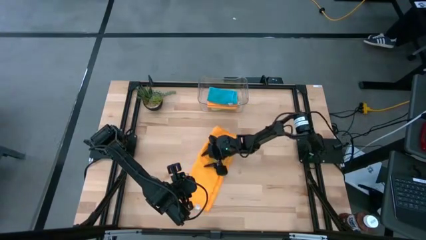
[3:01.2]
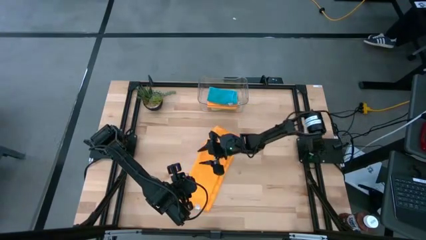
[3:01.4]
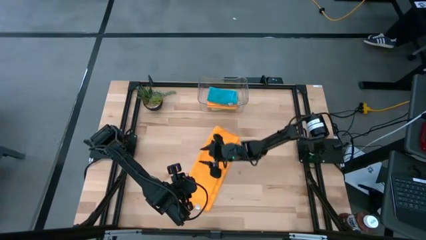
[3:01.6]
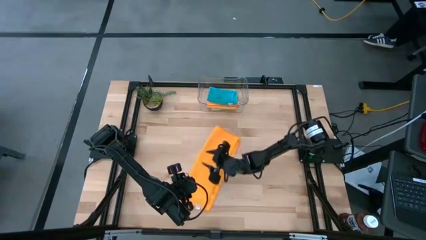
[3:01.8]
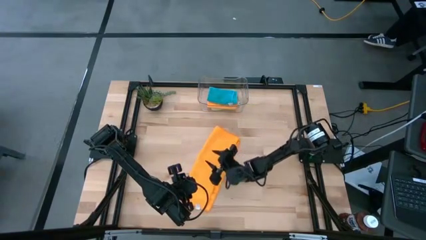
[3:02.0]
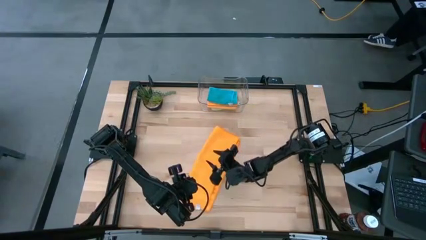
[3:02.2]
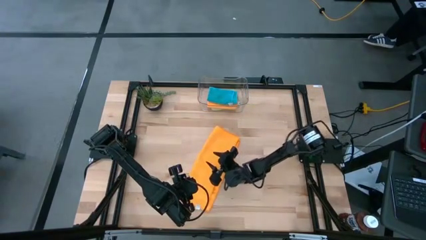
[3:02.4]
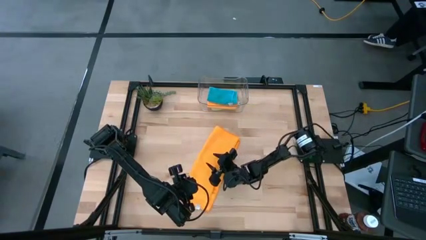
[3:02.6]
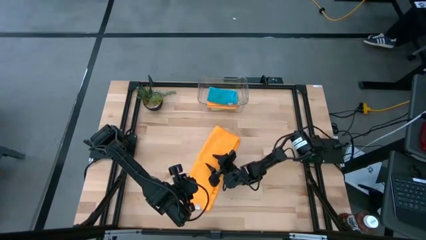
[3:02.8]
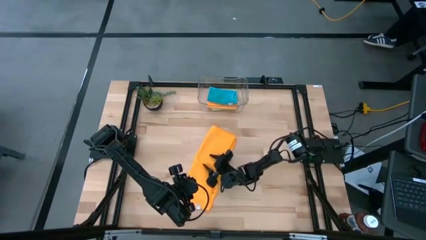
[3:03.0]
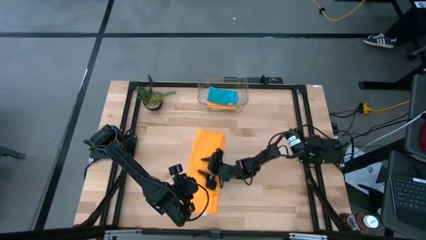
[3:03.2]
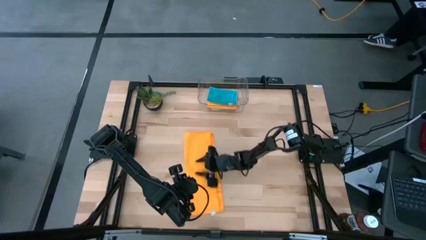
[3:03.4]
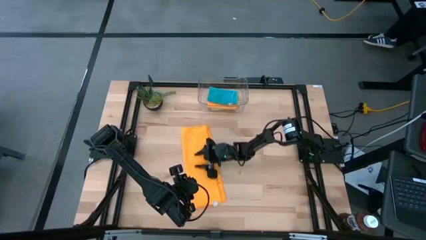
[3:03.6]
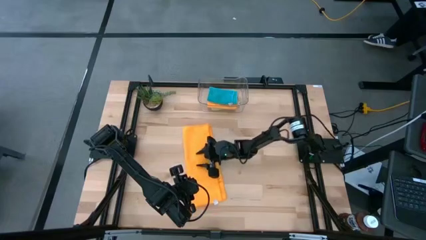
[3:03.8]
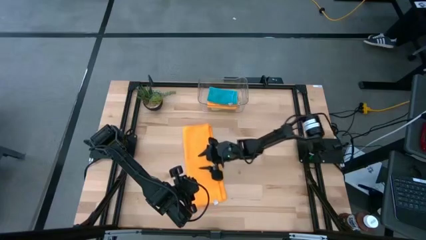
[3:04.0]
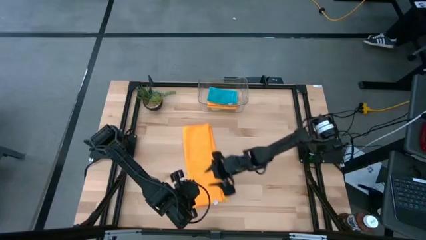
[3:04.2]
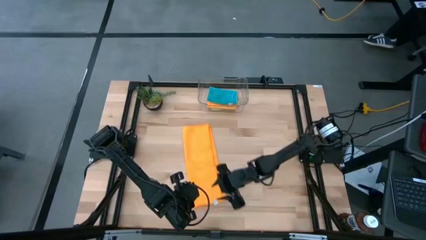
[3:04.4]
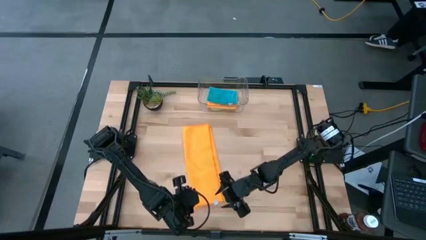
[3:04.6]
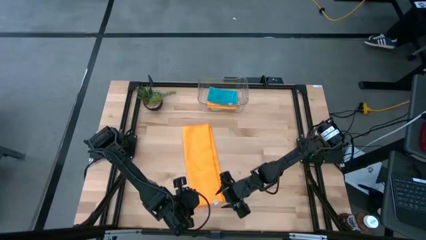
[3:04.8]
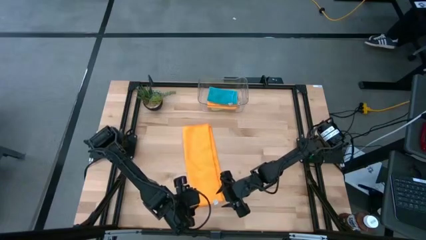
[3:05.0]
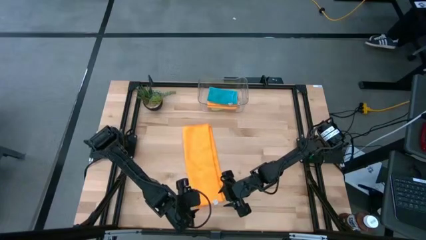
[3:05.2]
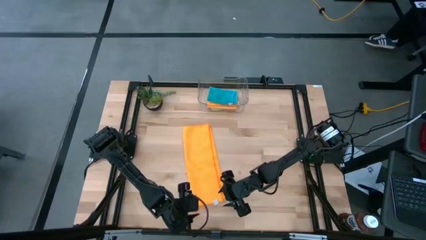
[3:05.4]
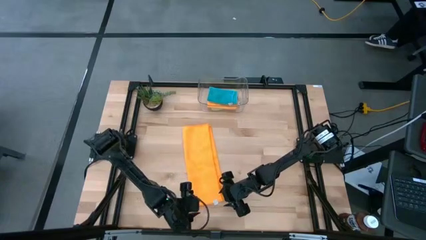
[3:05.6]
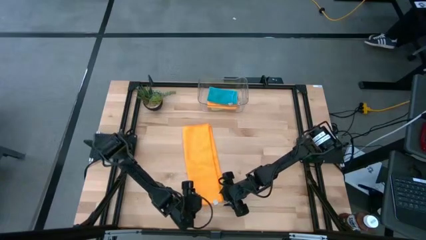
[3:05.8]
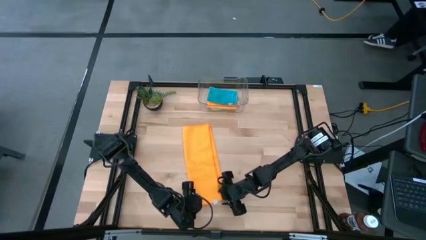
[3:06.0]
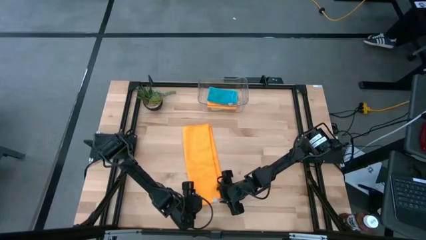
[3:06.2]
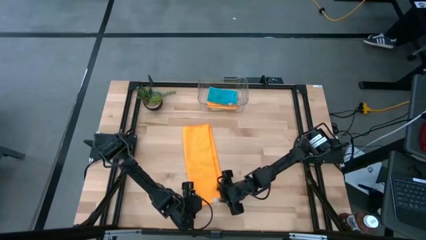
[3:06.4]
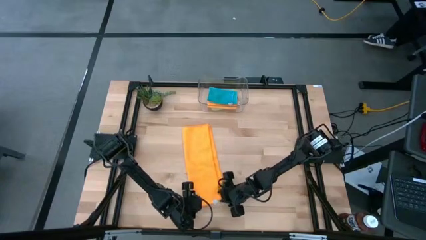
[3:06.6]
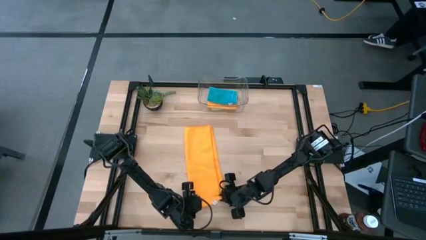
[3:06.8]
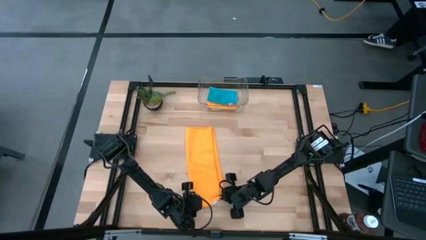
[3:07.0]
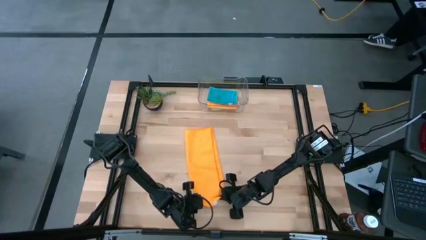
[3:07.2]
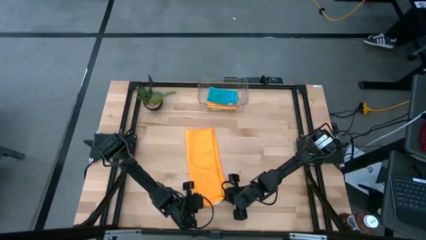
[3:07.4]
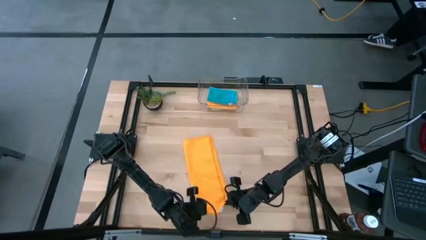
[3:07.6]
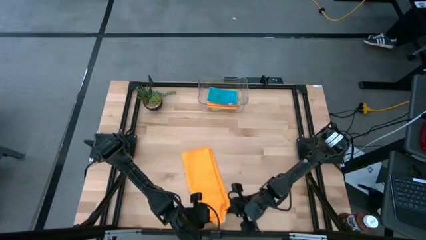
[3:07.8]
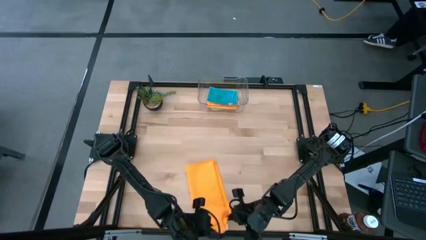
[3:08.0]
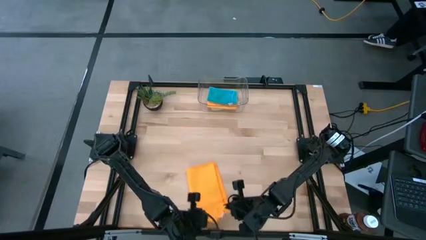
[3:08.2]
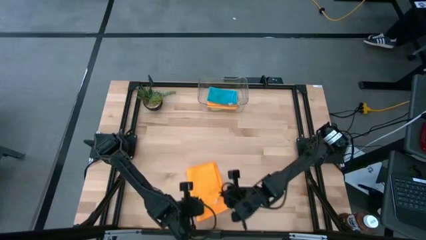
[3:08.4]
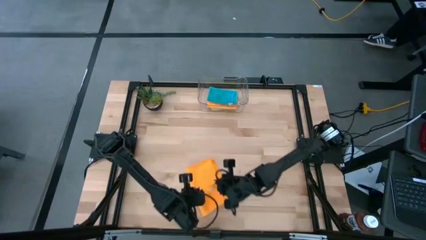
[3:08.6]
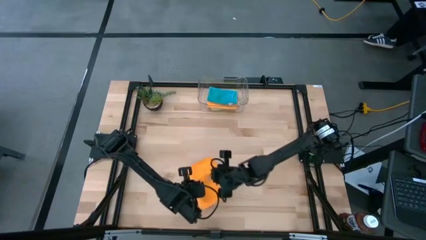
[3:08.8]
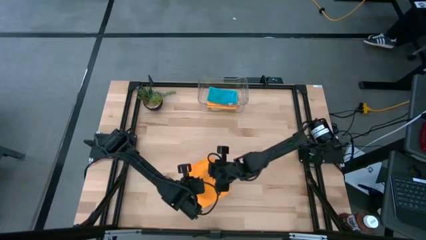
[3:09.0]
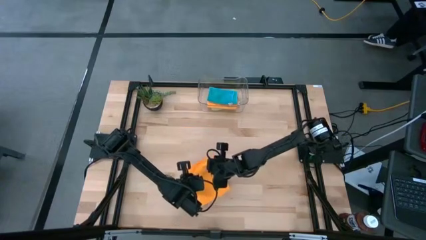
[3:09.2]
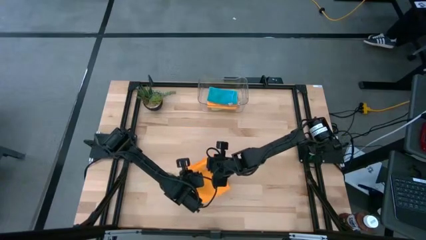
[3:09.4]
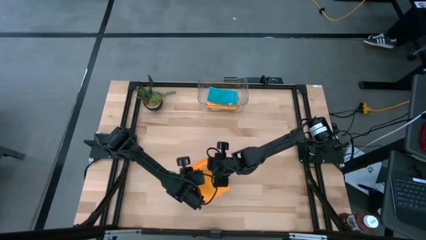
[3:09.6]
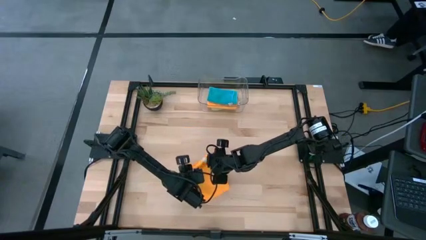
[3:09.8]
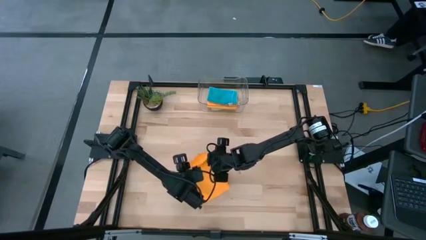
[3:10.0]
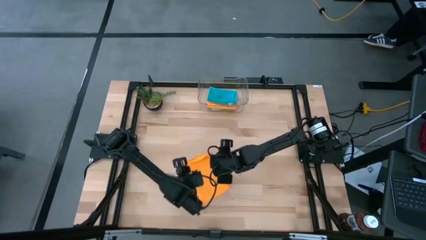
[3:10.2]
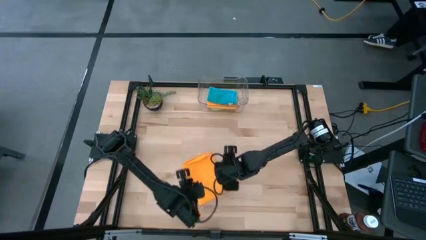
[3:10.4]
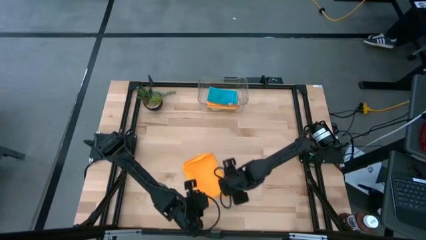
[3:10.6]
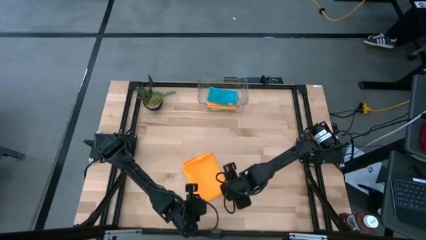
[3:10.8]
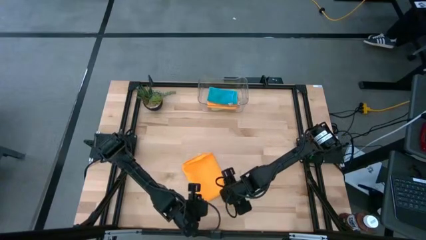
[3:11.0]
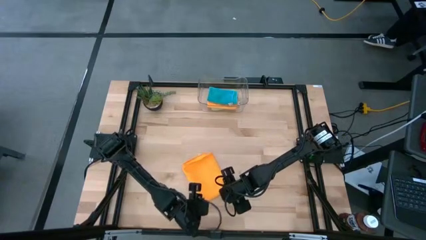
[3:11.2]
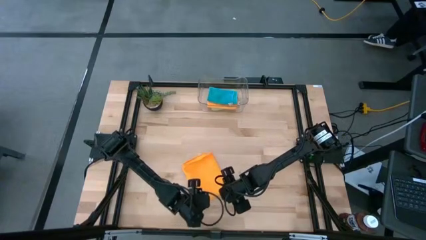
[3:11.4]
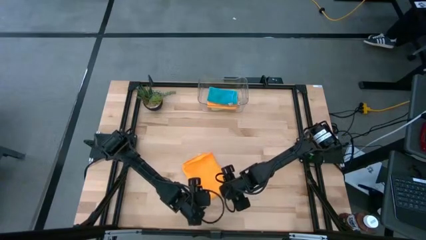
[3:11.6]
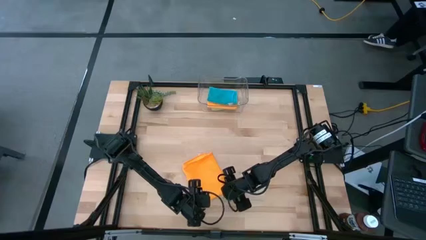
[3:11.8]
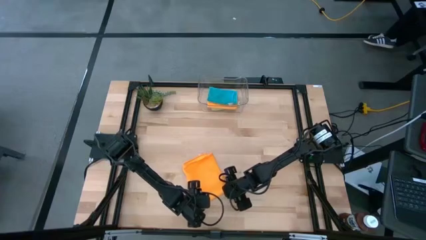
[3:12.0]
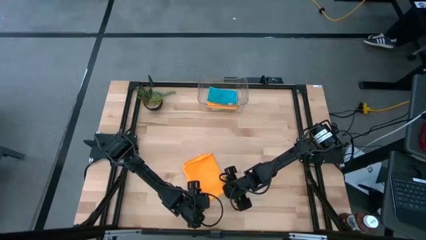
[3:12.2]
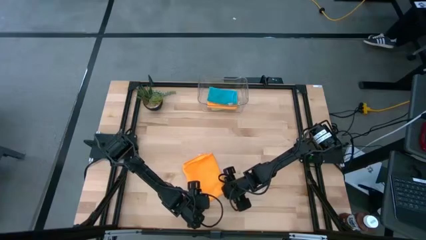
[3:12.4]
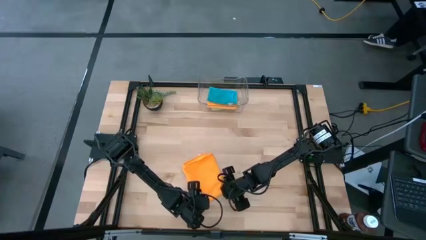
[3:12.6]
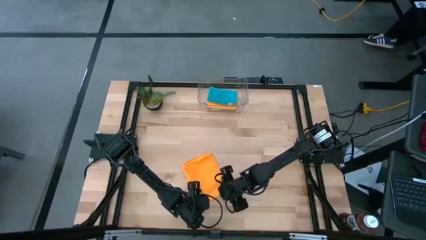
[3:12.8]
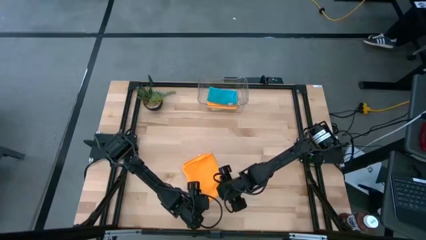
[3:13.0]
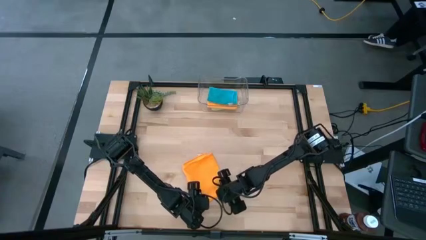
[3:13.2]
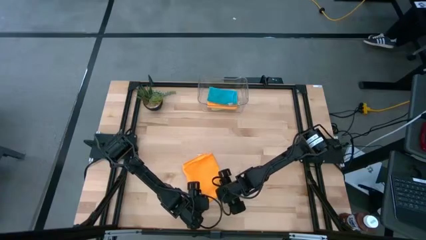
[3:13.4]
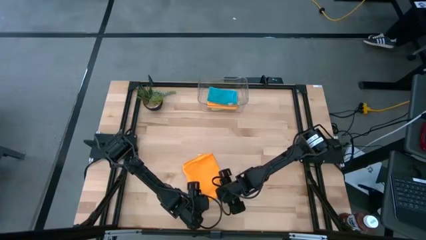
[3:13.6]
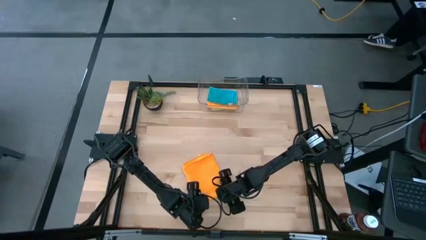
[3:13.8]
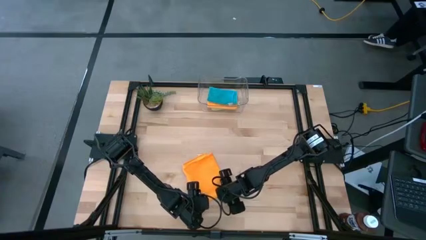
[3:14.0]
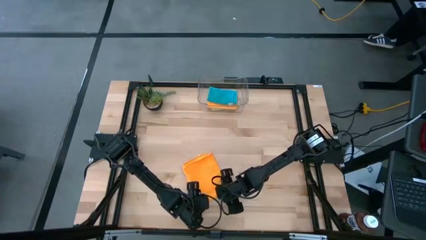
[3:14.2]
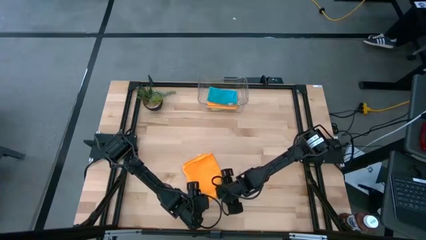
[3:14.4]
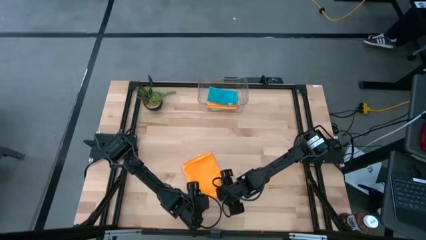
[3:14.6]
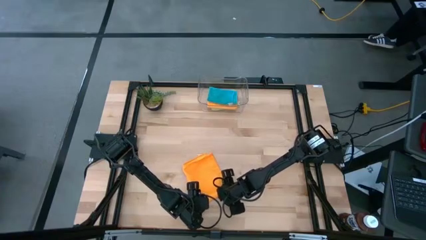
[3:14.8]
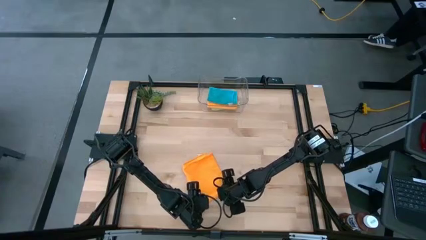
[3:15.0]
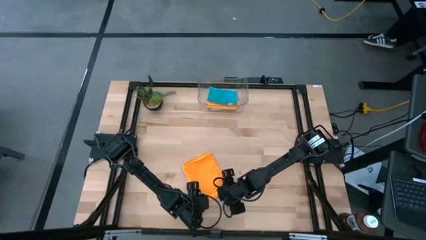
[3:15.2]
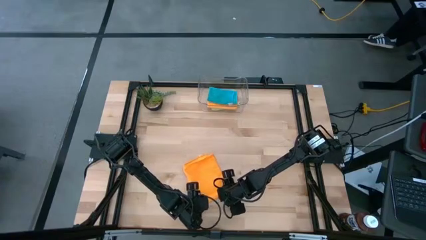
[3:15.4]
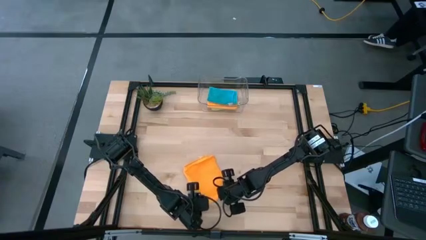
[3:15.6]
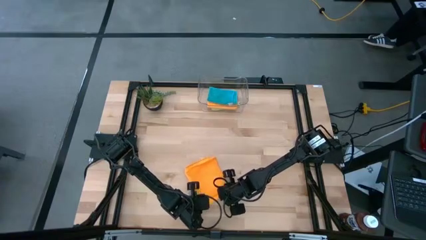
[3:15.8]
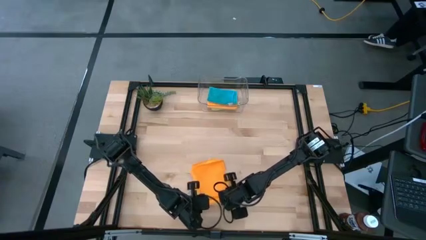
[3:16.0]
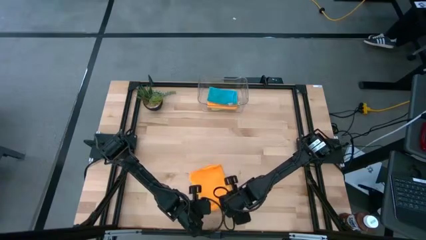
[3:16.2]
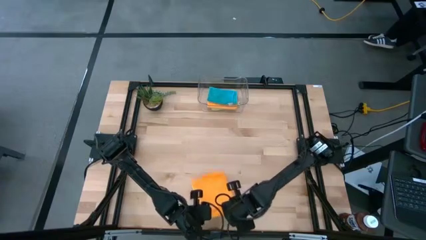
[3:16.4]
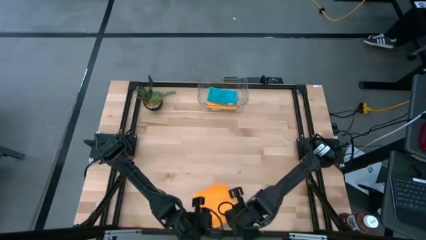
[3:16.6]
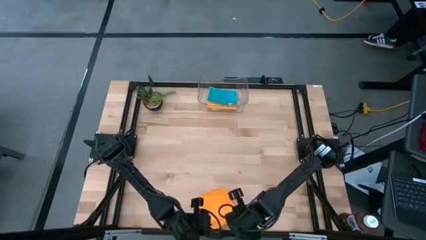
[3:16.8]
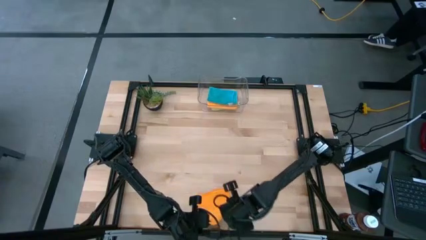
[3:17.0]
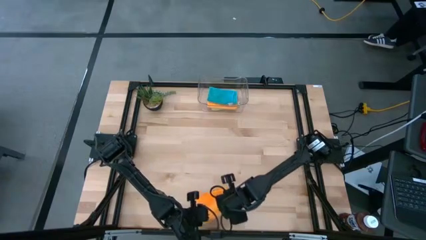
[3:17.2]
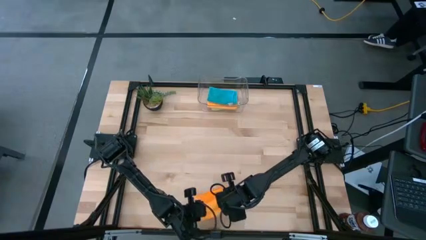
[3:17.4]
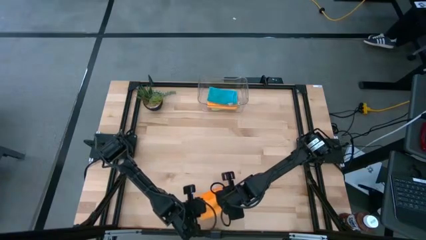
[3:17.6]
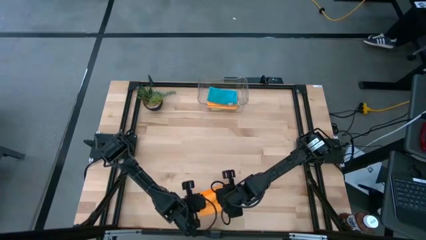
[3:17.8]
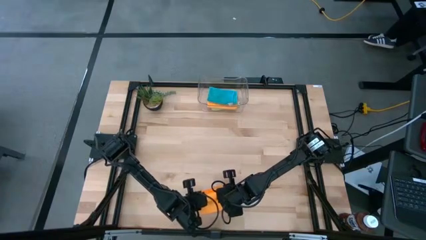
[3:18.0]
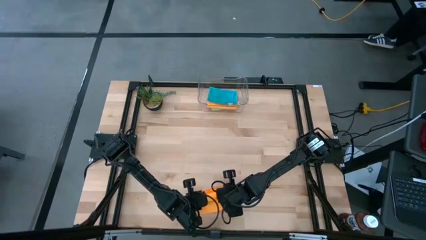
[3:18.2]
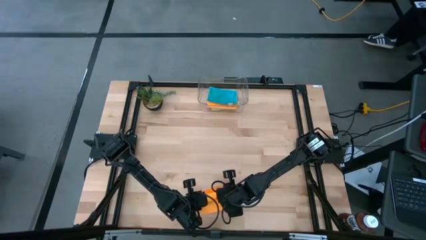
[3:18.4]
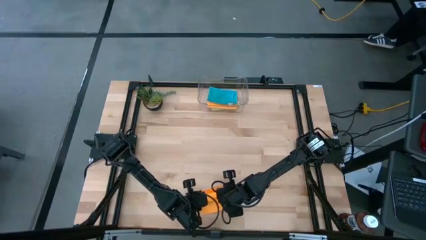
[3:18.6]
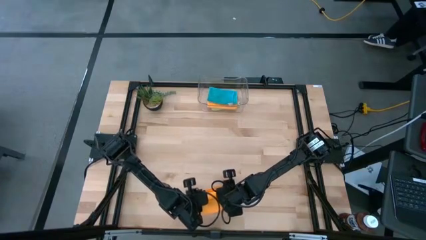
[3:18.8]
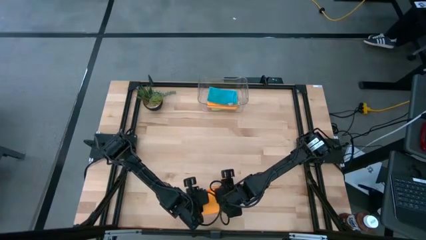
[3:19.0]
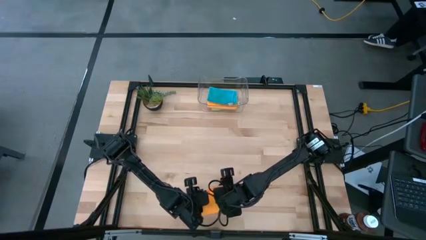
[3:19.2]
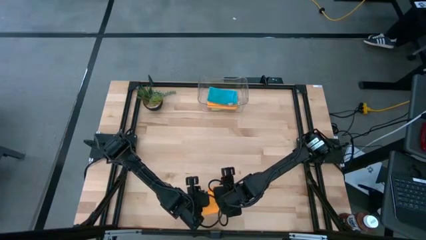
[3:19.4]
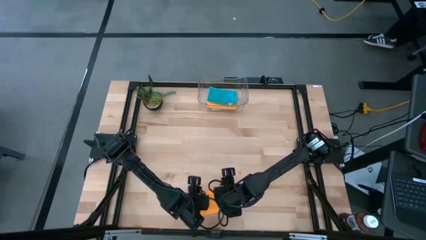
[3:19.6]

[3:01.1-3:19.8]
Task: Fold microfiber towels
Fold the orange microfiber cloth
